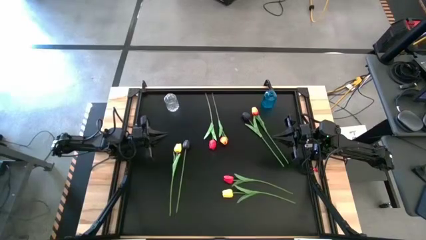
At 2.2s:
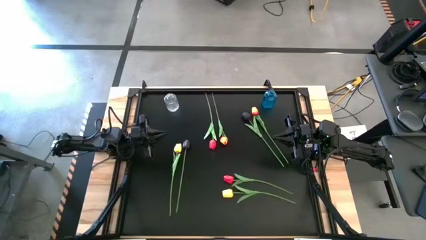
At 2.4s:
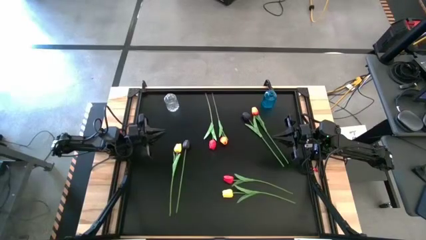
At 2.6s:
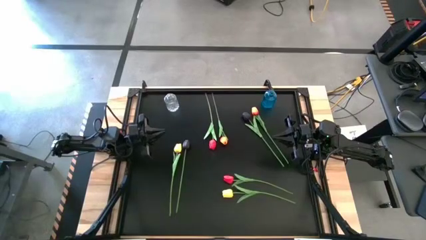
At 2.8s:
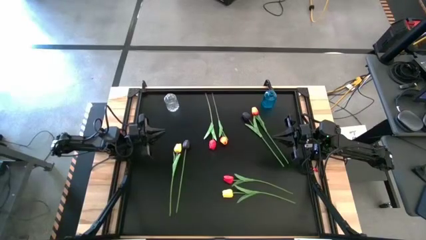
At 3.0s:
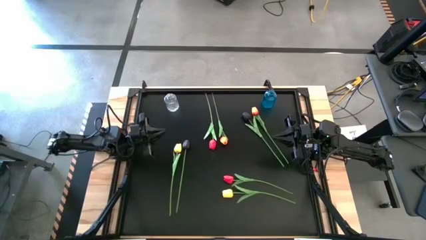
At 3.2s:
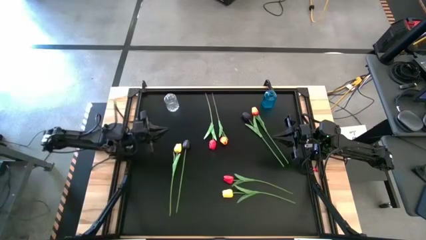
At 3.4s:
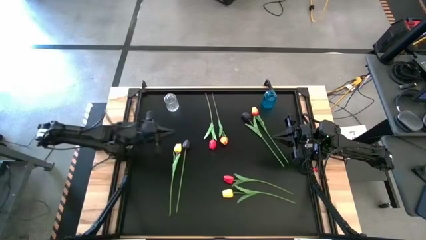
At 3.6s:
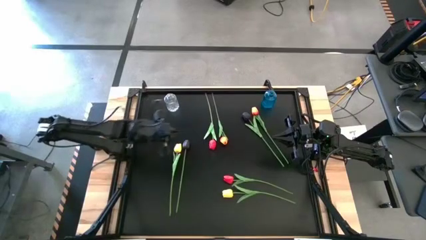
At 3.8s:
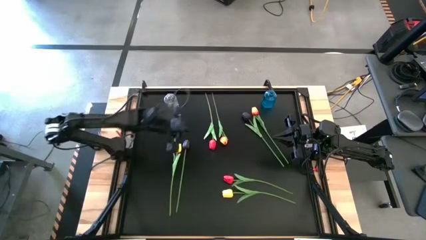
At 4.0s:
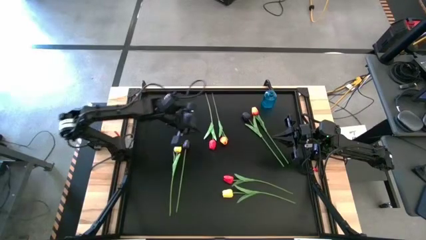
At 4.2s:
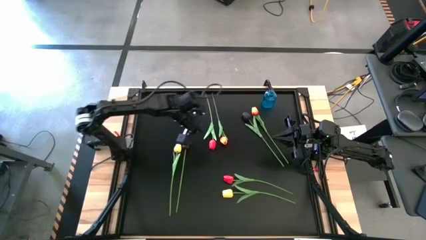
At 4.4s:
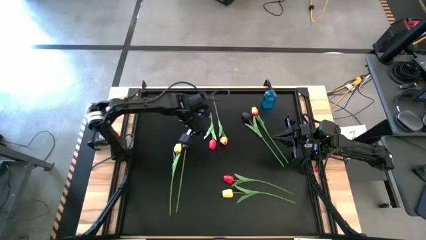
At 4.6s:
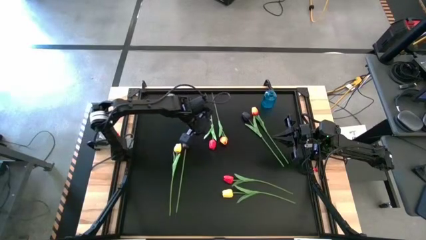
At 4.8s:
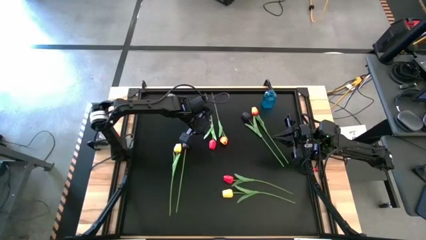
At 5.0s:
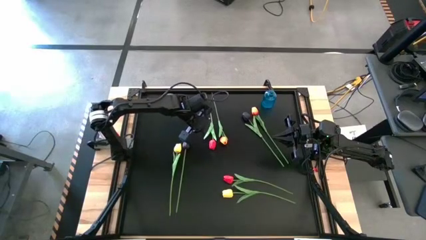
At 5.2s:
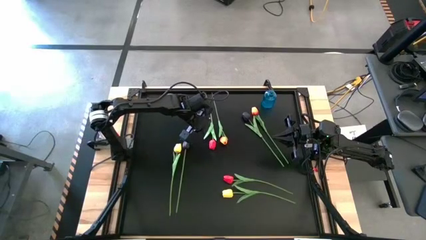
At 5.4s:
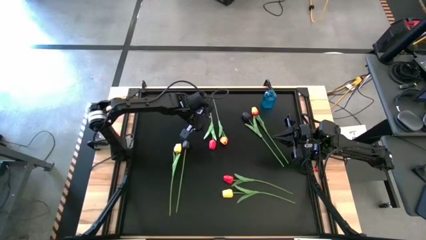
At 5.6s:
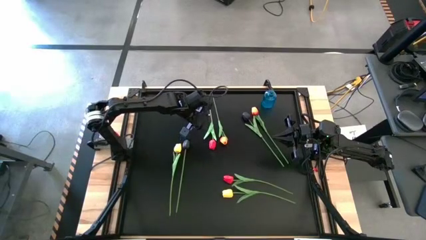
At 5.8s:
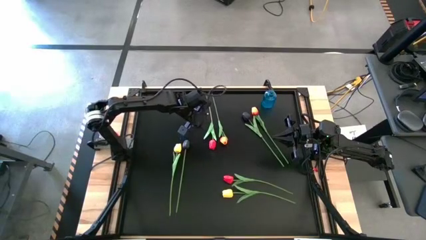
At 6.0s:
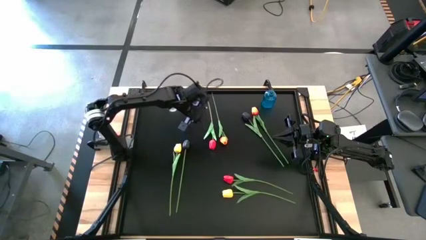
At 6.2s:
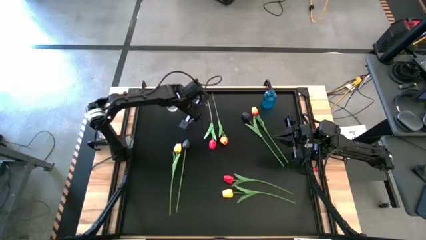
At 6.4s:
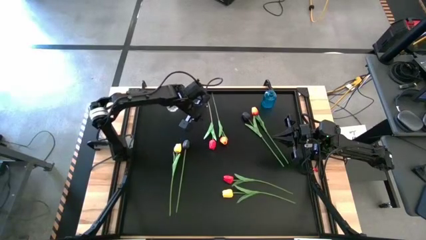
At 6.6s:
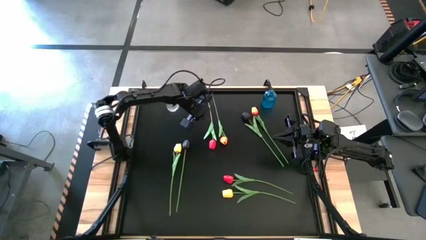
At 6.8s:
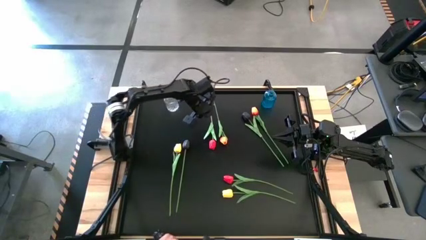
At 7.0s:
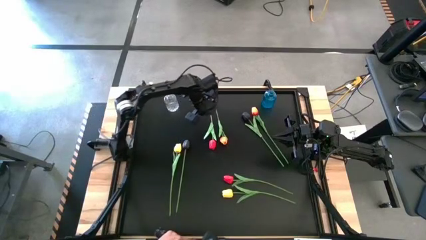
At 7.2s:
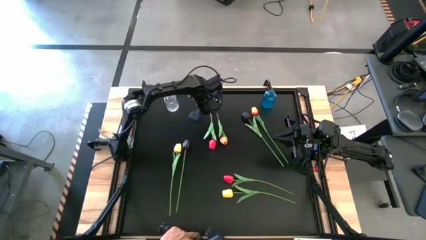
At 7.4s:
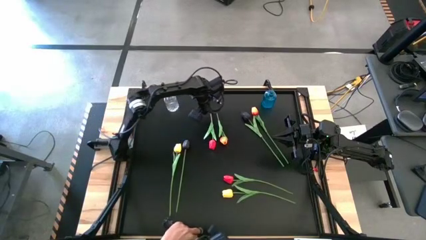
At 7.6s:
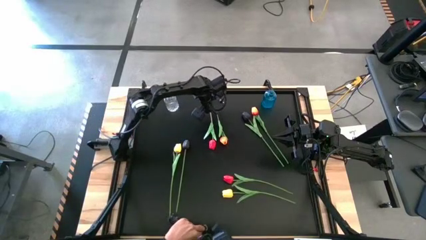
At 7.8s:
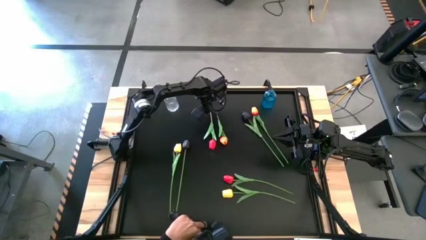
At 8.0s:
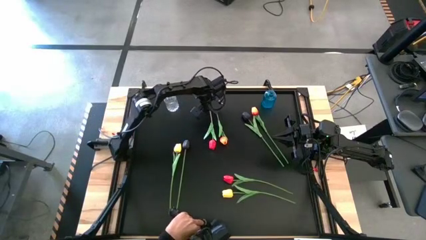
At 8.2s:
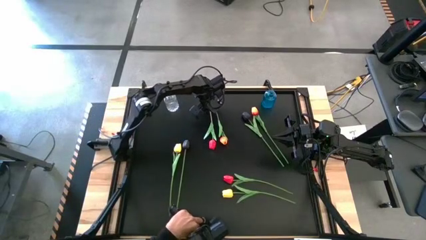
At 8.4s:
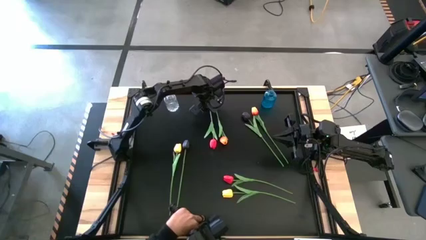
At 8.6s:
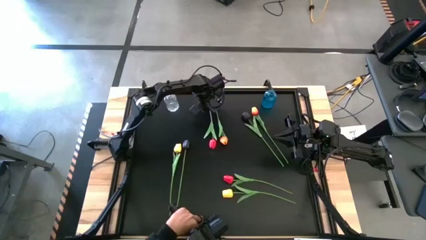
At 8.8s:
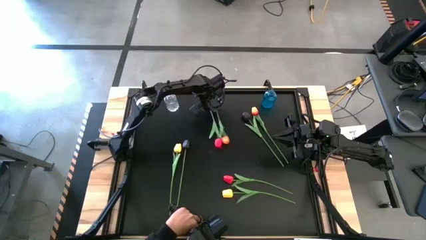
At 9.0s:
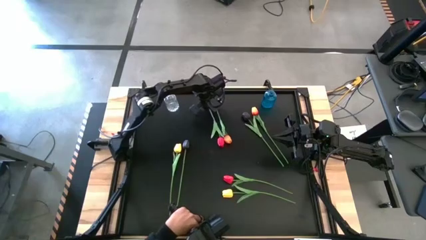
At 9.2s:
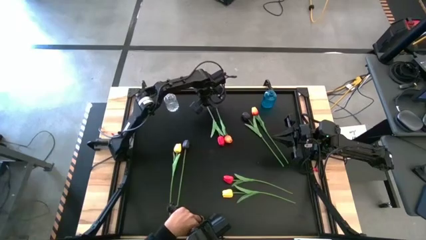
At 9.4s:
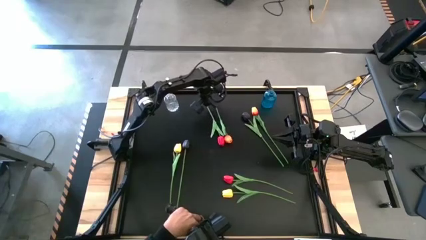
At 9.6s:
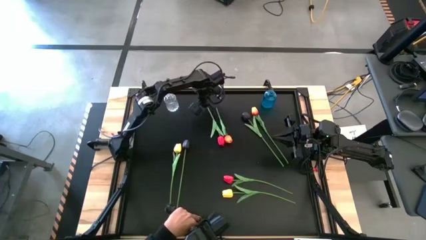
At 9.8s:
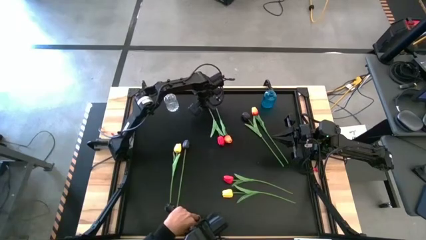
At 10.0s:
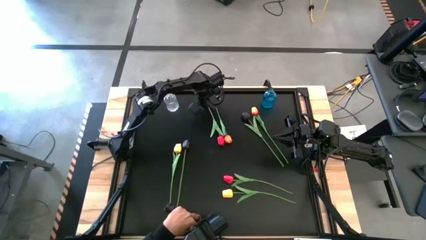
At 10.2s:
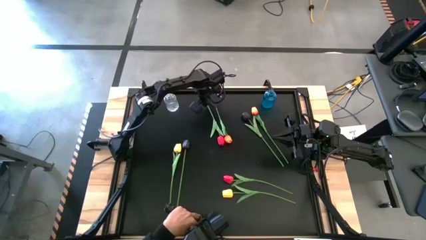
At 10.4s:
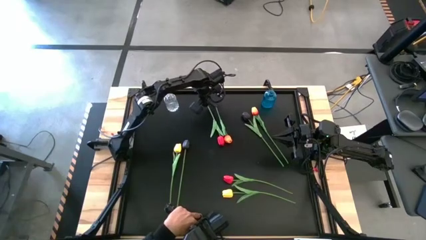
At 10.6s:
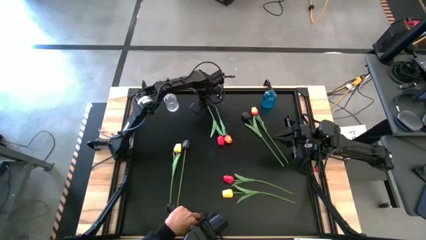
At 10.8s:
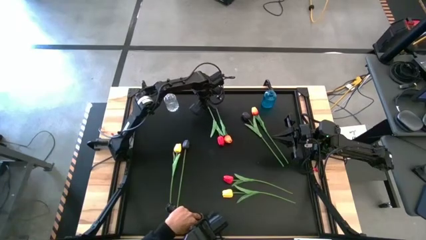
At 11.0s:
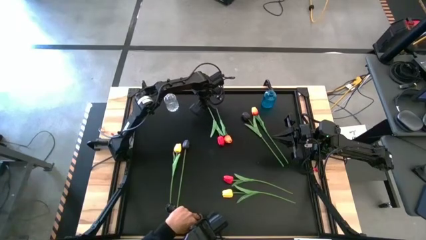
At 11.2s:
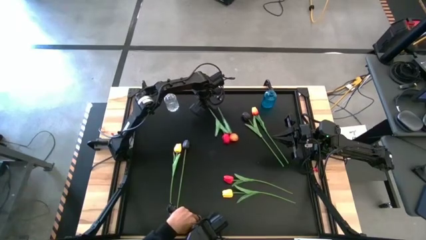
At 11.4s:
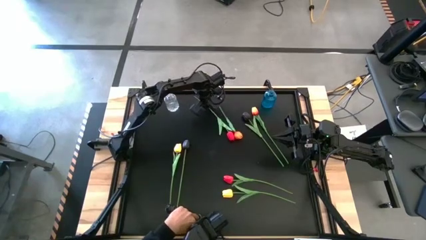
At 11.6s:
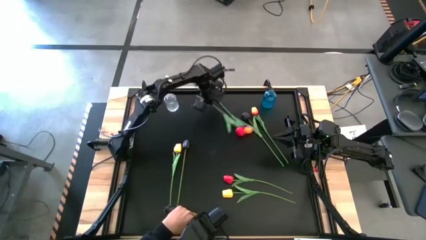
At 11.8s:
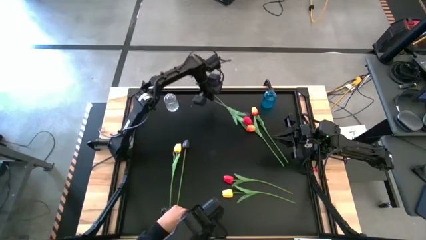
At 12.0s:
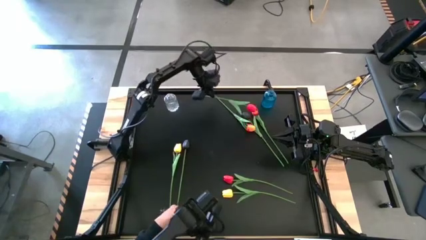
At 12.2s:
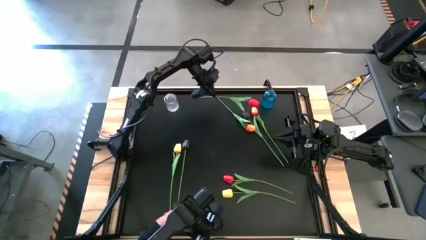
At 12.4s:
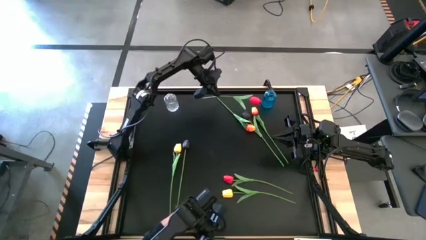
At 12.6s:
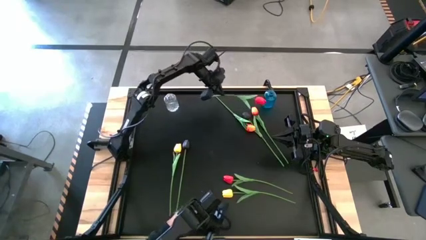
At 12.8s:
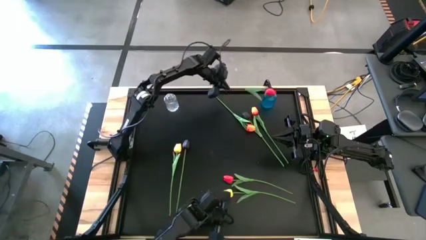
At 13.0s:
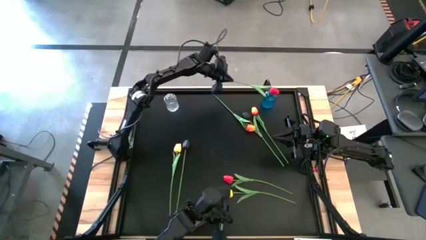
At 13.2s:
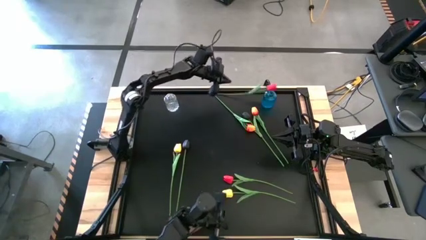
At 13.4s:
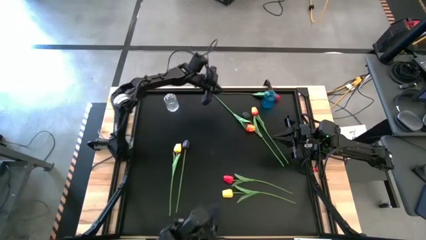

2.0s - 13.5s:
Task: Sort flowers into vase by color
Put the top red tulip into the blue vase

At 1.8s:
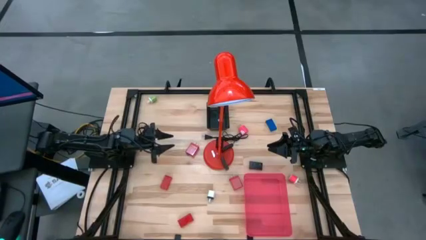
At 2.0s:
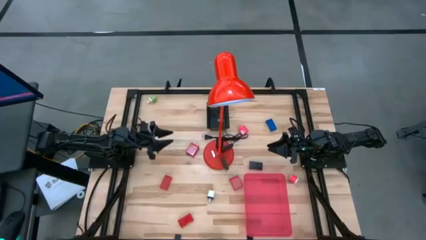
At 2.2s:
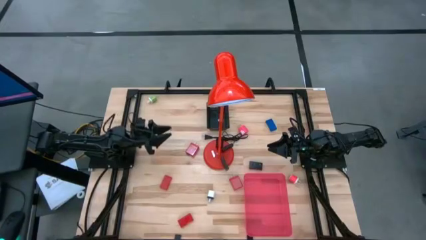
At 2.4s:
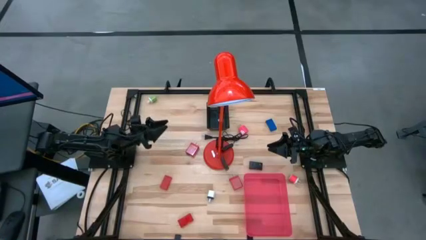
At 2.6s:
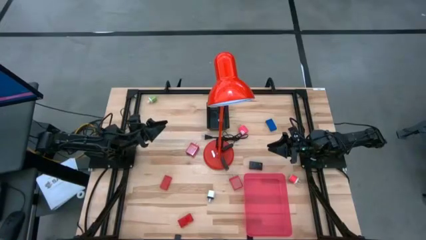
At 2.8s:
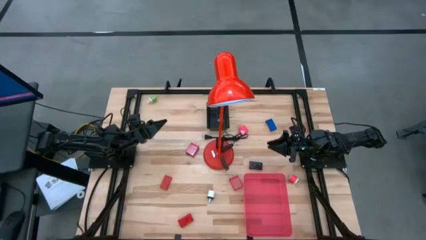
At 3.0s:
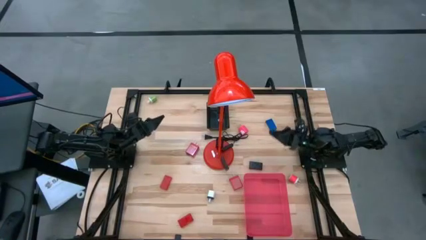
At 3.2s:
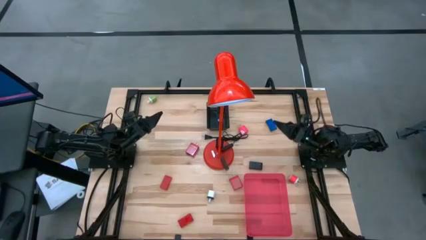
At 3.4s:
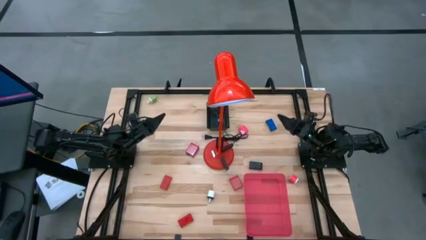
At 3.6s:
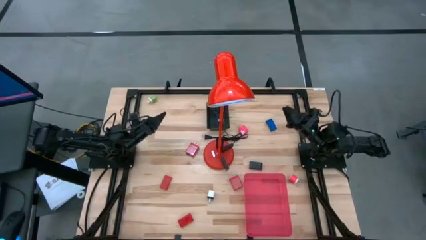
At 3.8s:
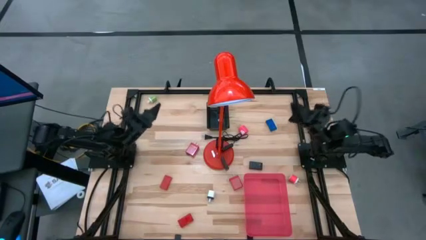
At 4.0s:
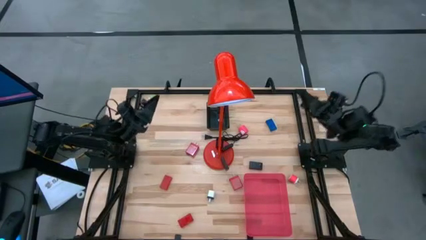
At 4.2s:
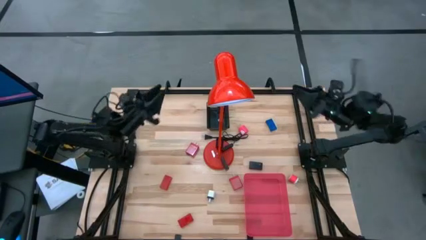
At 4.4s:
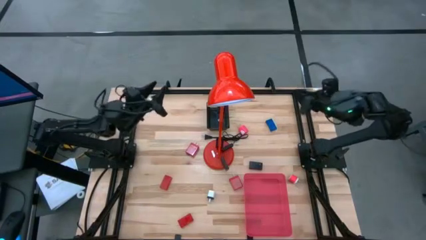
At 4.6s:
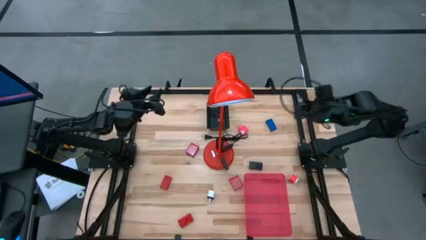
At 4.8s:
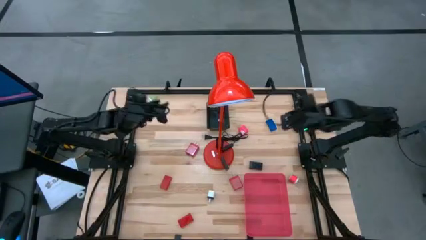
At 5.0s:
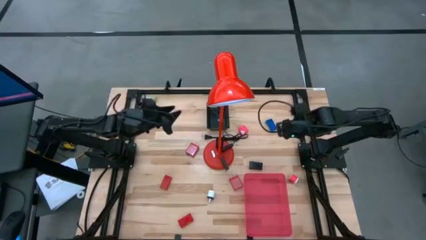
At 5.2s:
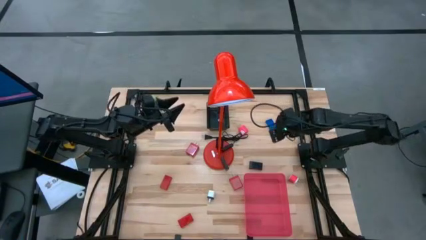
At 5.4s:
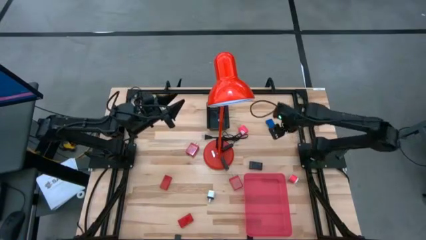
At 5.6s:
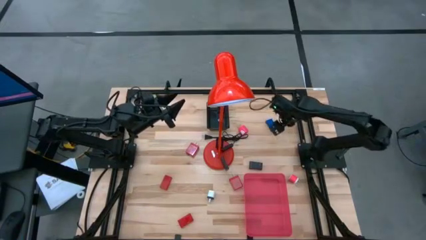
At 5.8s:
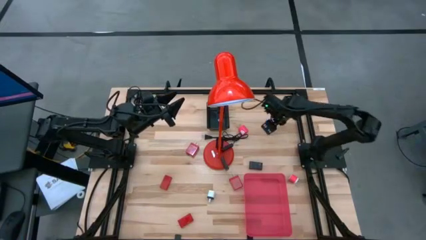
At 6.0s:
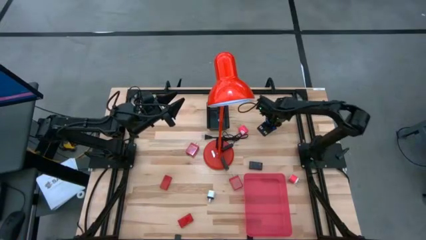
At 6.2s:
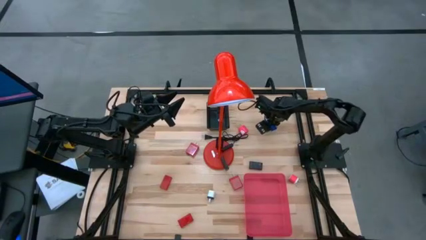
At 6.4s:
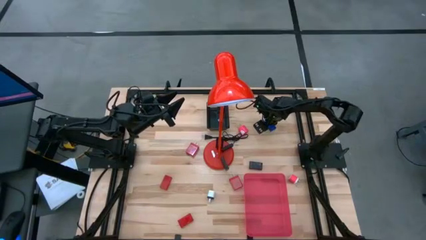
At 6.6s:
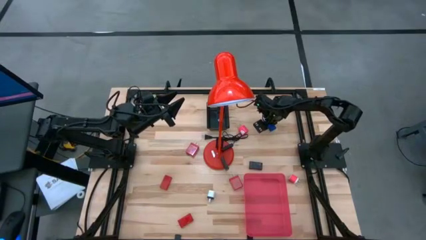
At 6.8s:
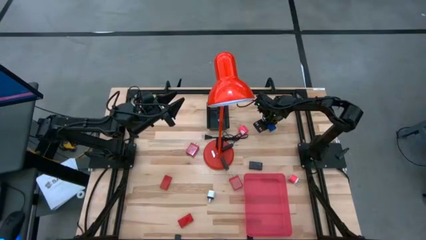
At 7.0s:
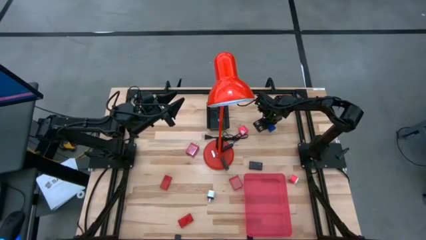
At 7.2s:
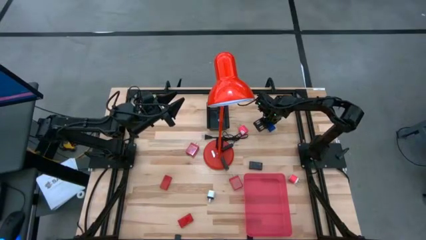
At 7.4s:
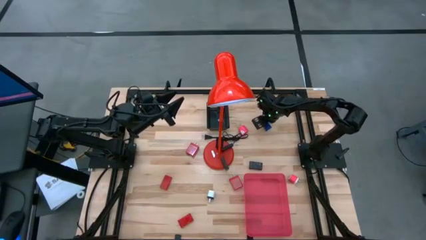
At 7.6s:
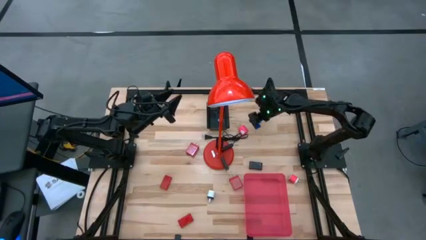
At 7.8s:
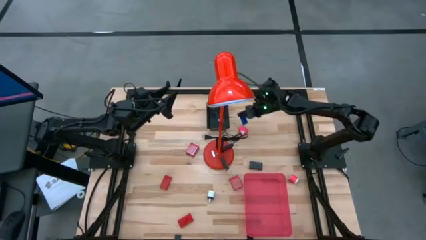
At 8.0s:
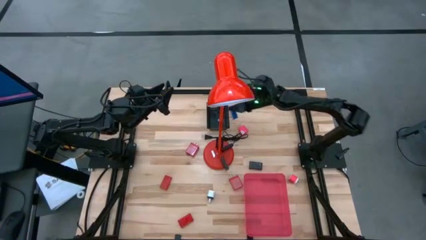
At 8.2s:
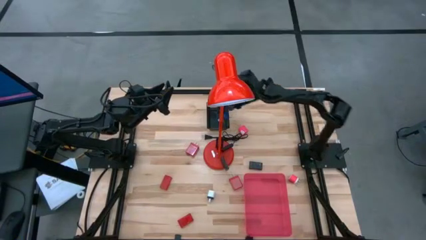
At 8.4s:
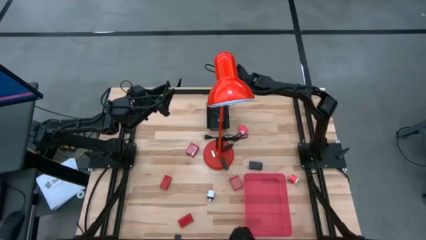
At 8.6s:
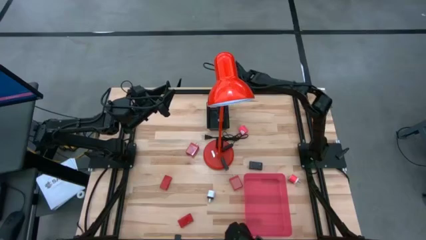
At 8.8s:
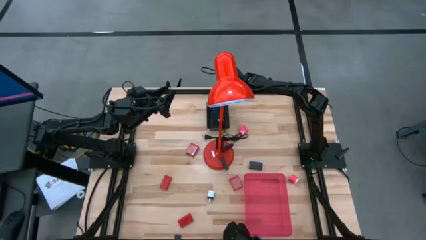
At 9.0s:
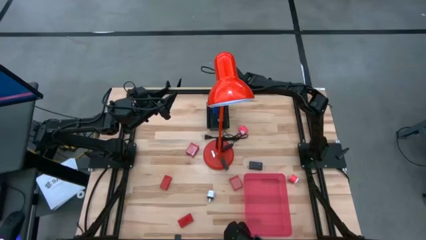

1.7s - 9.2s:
Task: Pick & Place Office items
Put the blue digital timer into the black bin
